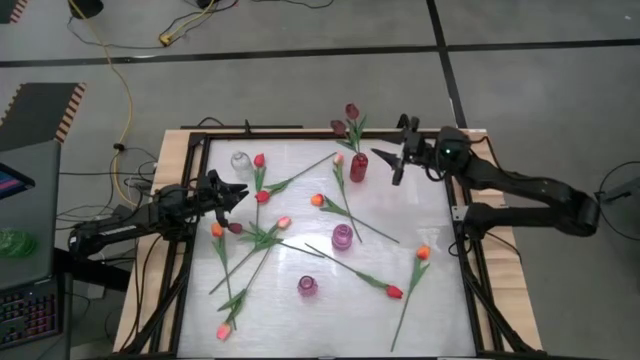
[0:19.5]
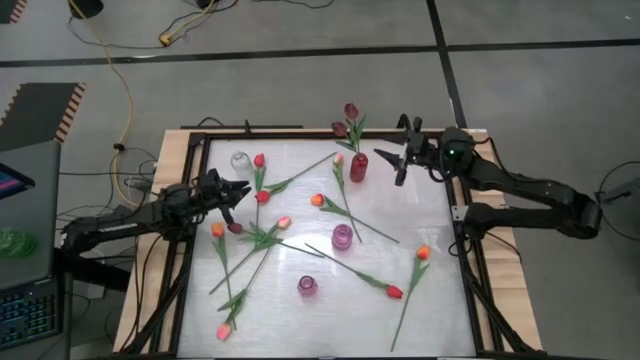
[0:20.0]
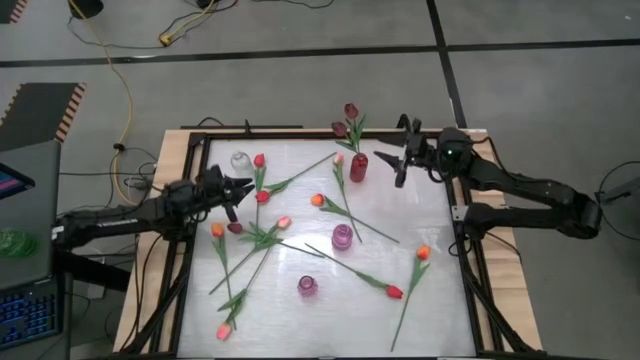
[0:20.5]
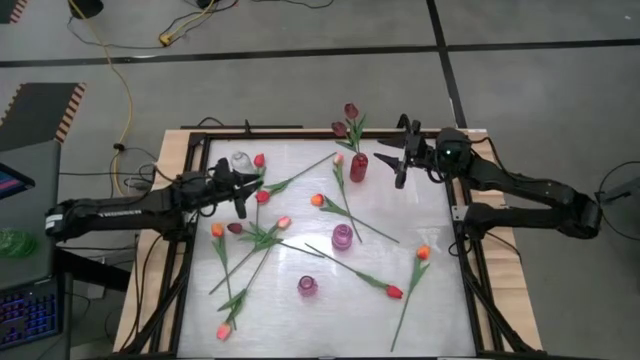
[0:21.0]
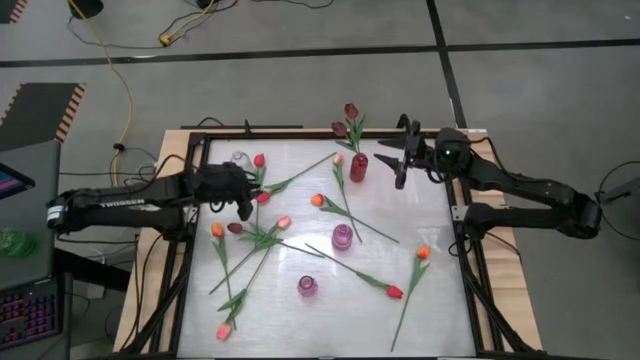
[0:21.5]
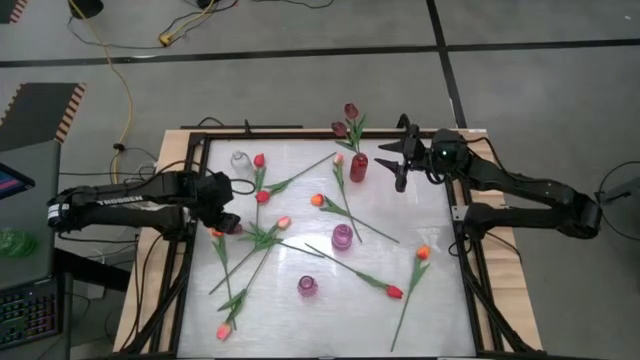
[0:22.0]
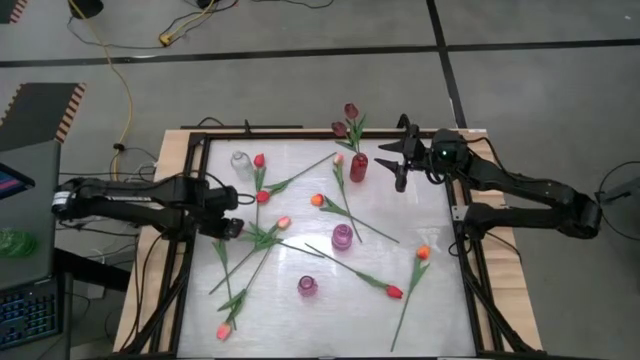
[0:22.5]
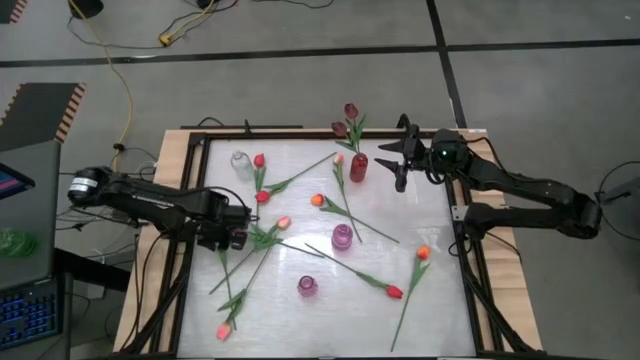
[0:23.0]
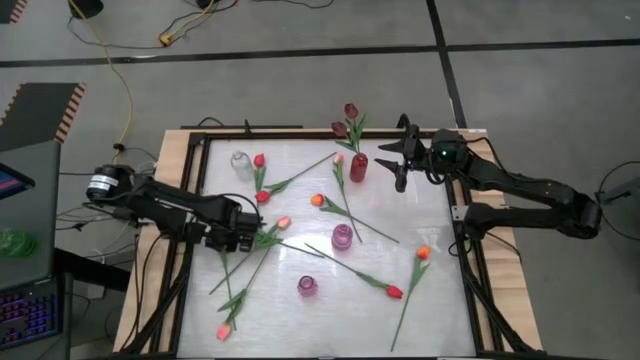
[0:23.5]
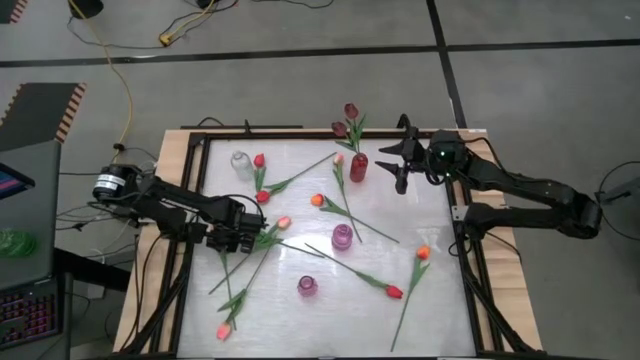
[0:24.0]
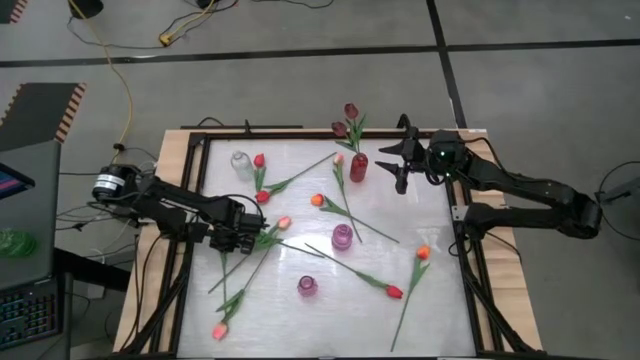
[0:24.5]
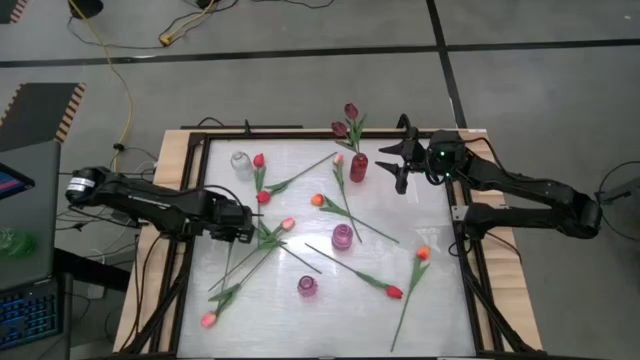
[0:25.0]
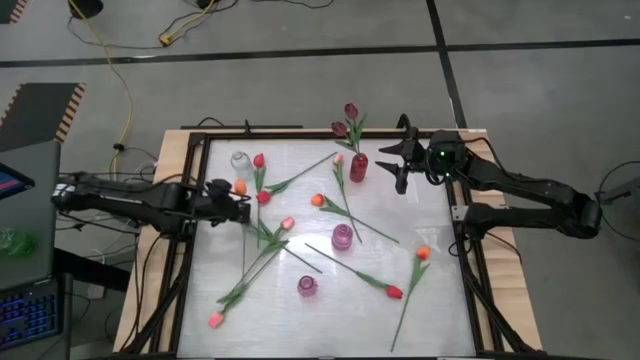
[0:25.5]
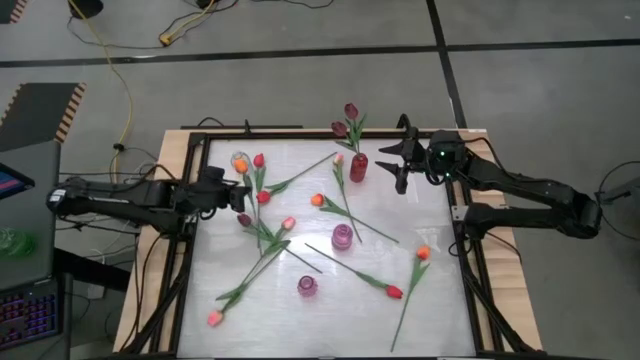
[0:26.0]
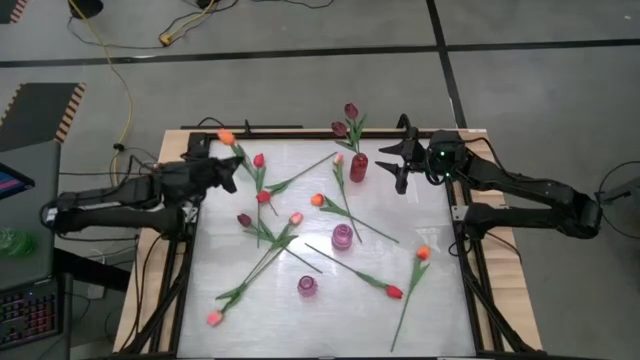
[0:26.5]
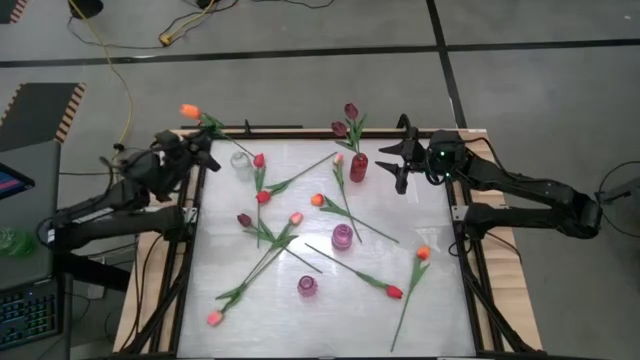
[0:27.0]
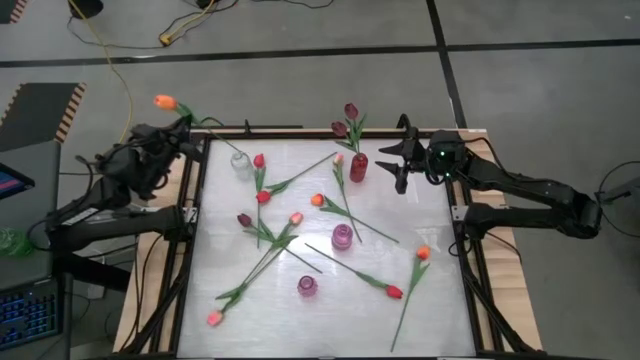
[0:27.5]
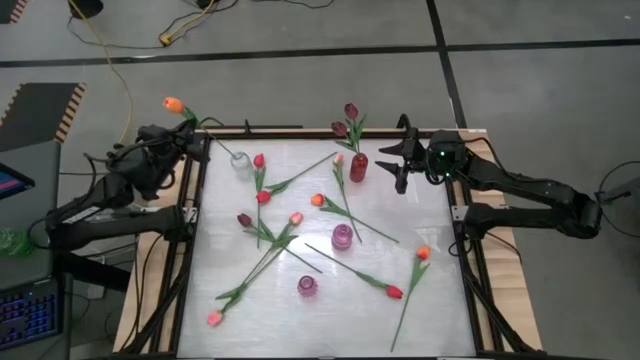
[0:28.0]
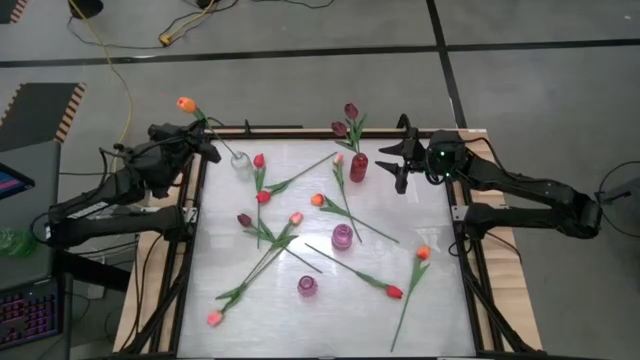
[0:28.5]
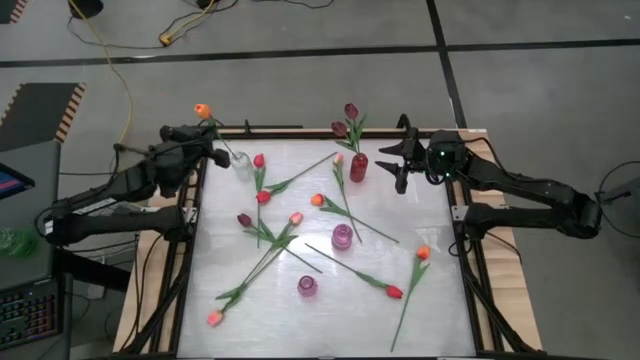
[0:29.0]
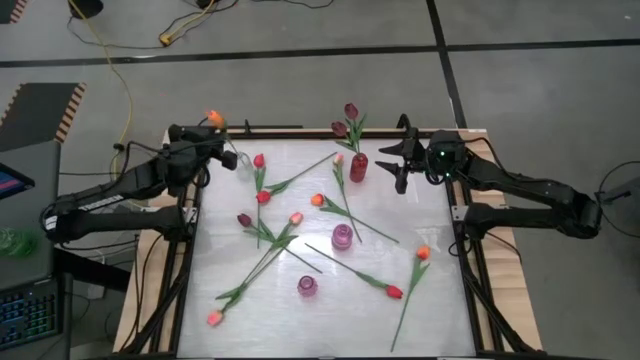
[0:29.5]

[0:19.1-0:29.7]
Task: Sort flowers into vase by color
Put the middle left orange flower into the clear vase

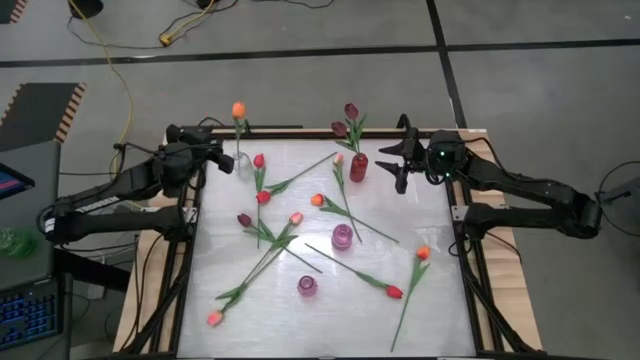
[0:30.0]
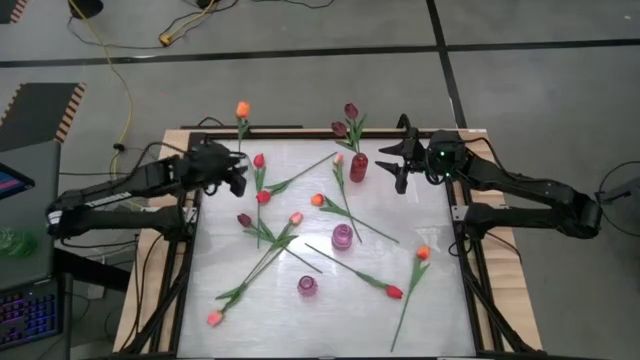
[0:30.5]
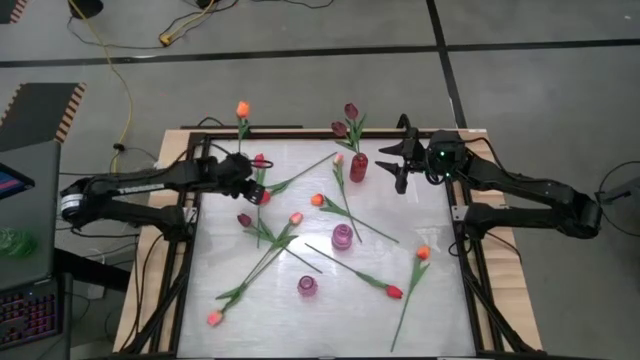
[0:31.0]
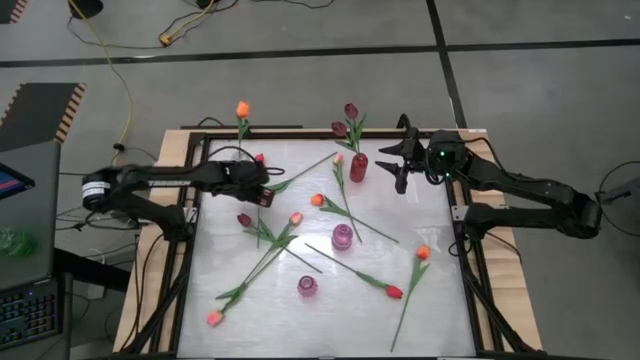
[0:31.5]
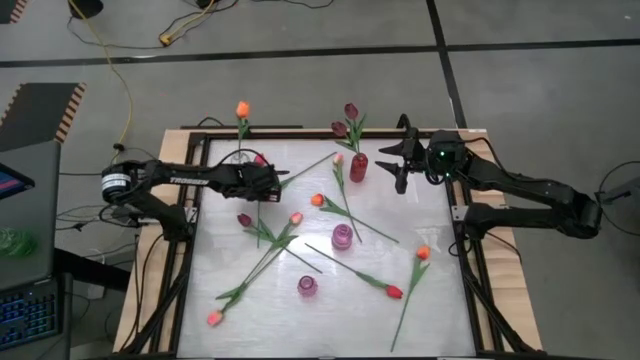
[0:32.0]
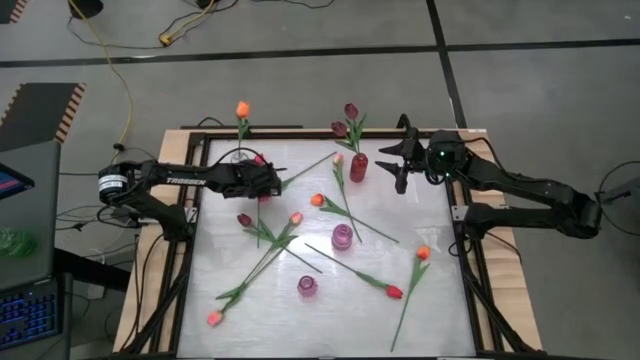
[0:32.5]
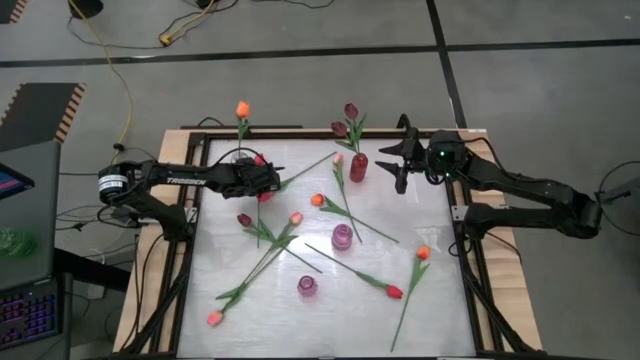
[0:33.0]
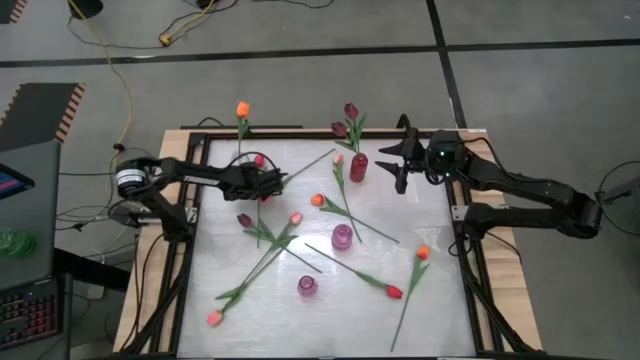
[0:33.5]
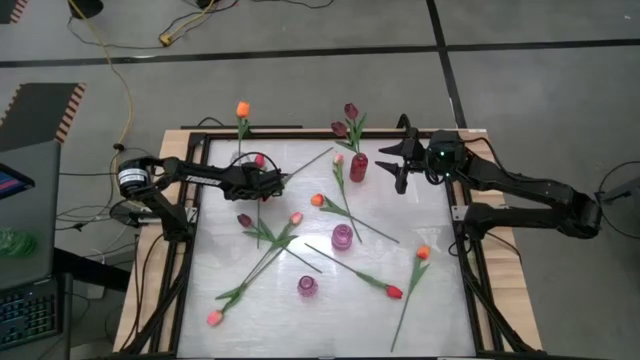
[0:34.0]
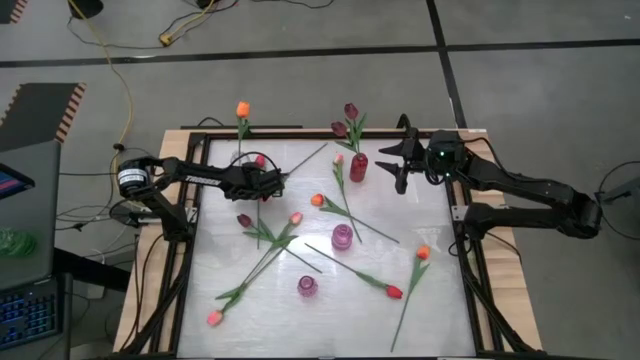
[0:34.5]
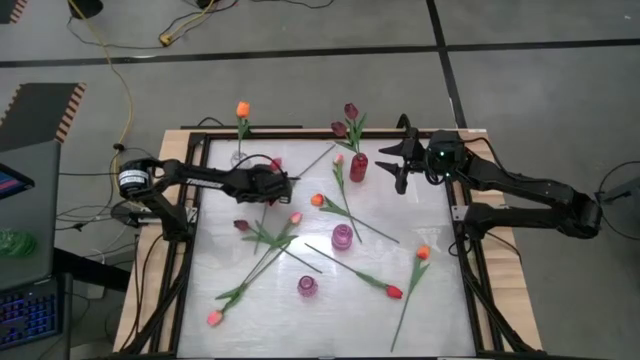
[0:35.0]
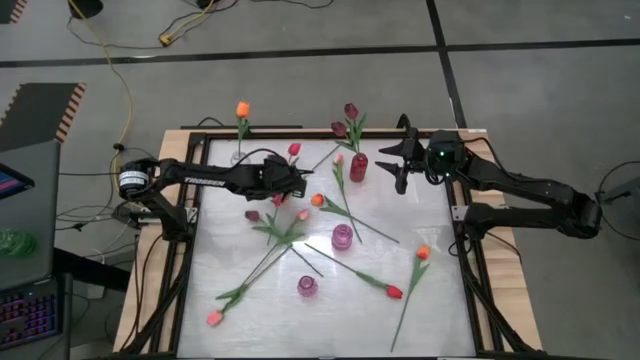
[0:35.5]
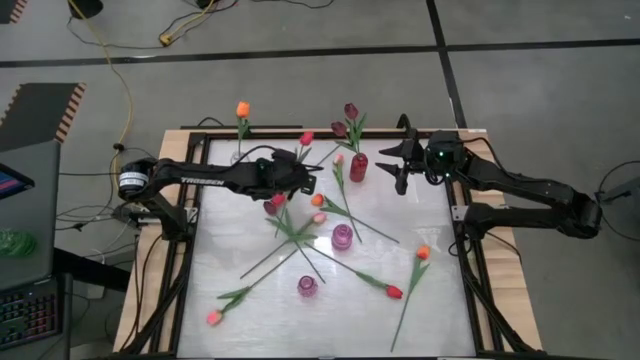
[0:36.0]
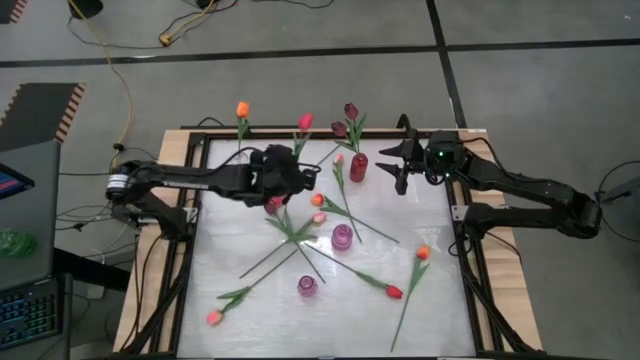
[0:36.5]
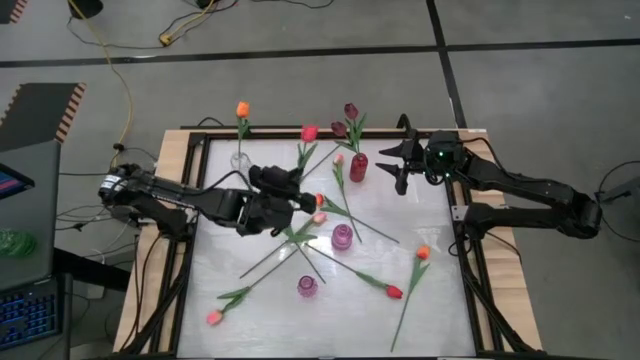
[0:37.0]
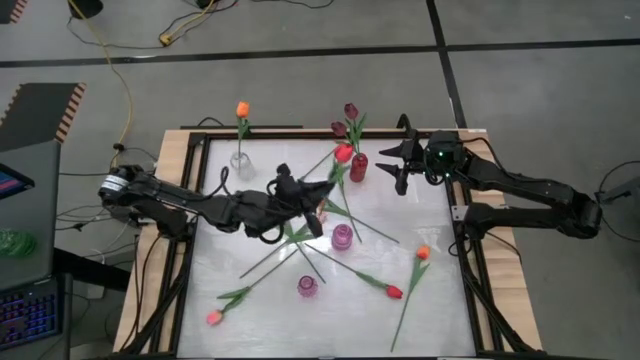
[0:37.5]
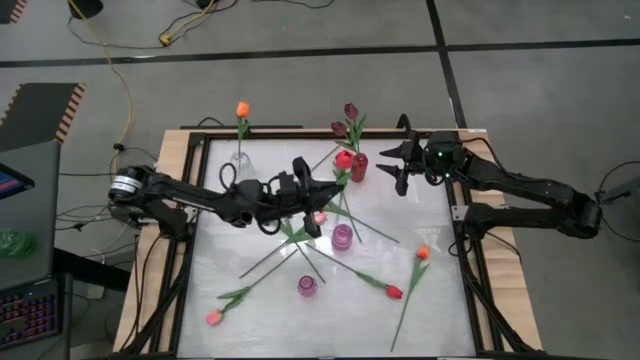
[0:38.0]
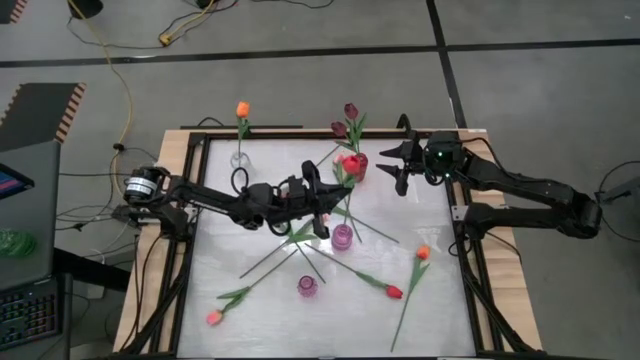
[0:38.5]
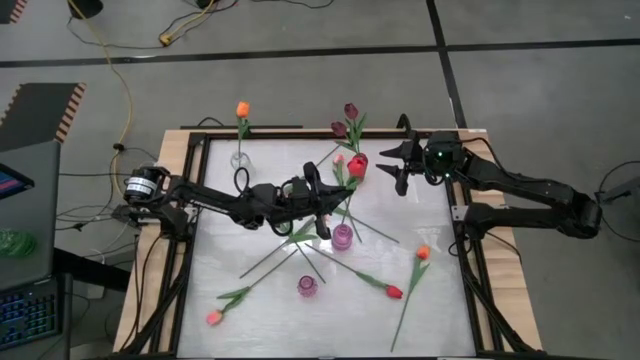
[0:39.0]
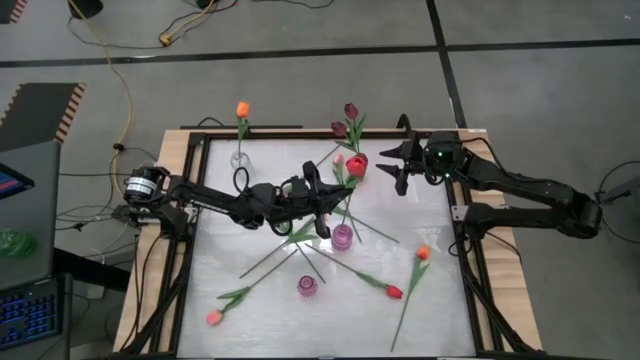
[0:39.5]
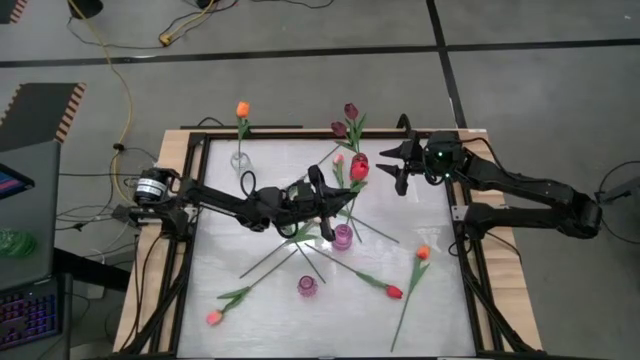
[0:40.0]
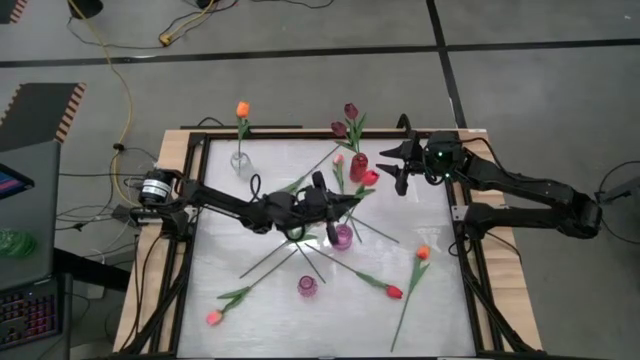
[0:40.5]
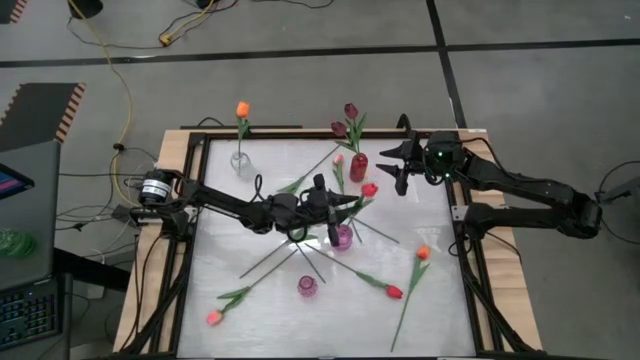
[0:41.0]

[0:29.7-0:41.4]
Put the top left red flower into the top purple vase
